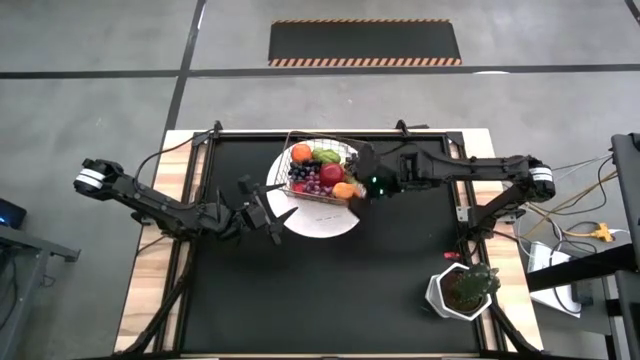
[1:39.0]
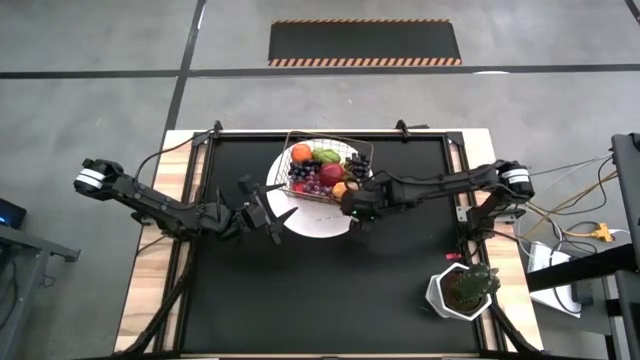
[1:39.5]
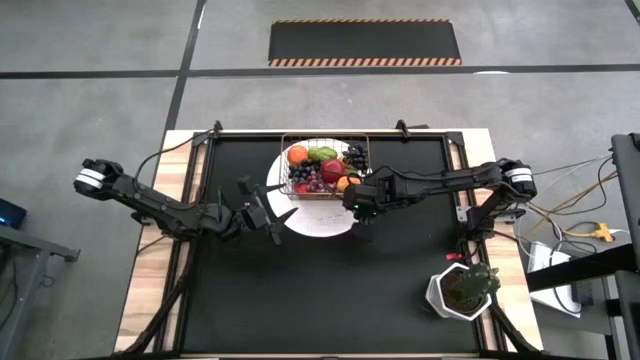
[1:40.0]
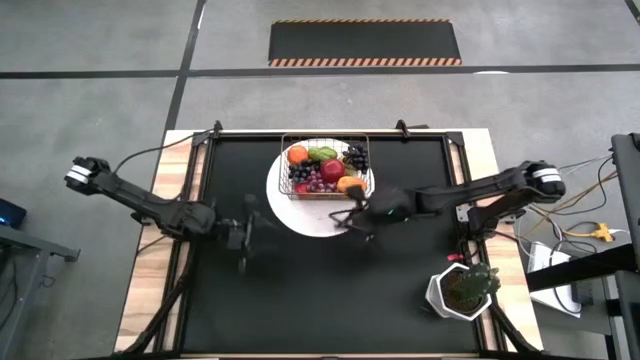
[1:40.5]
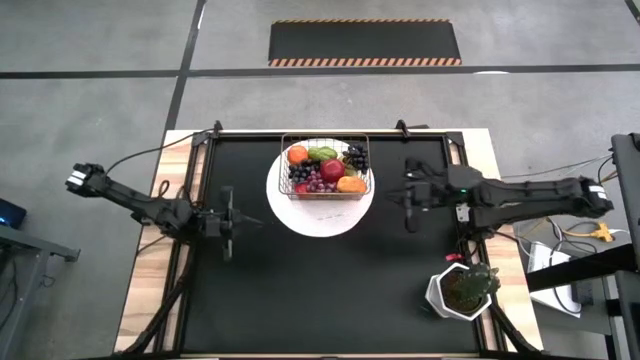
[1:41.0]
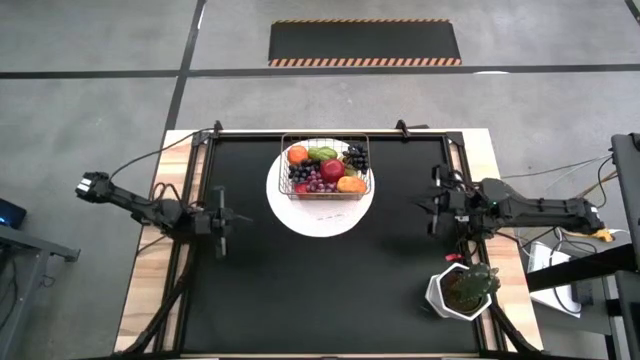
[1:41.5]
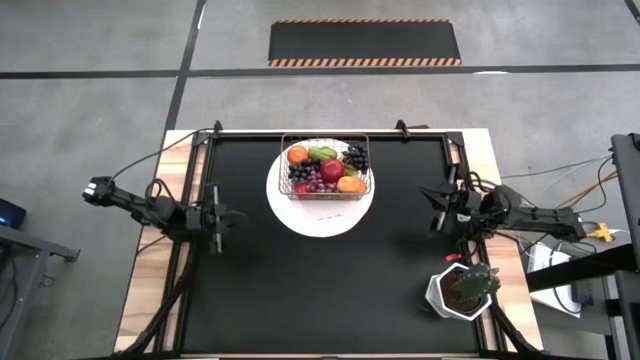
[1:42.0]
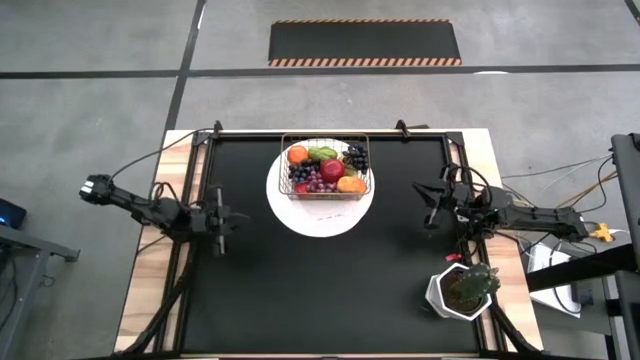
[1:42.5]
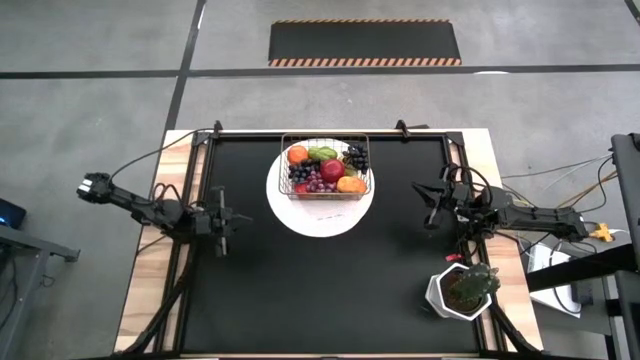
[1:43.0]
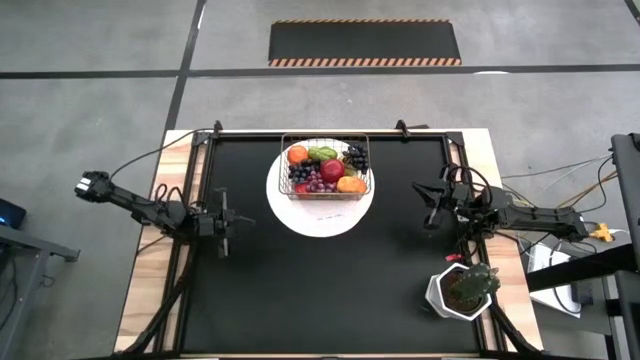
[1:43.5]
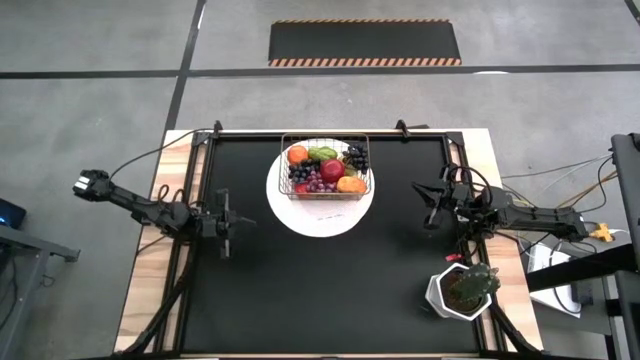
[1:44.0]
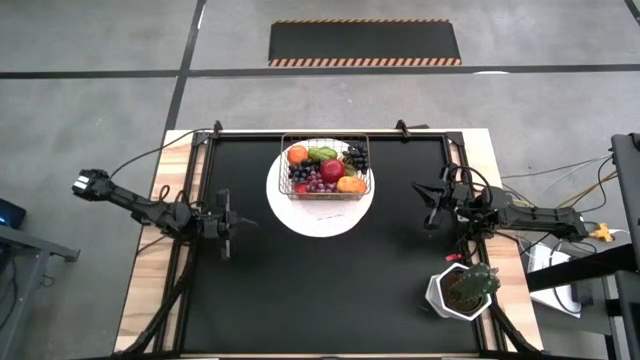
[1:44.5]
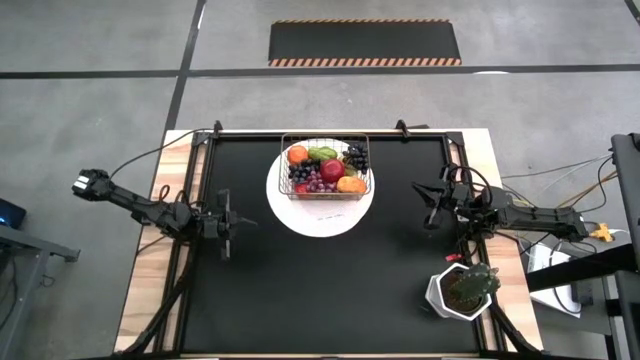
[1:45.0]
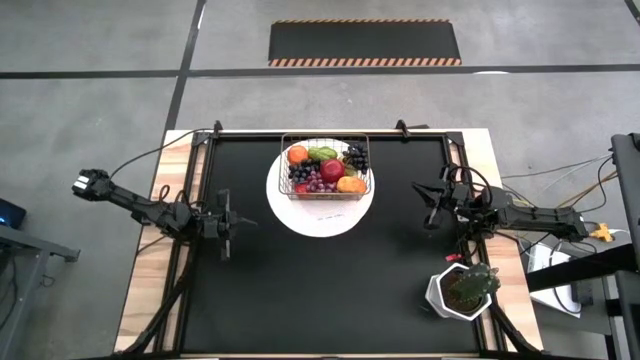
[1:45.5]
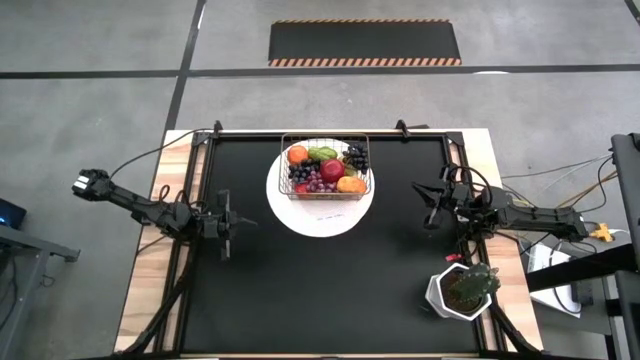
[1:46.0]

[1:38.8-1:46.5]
Task: Build produce basket
Return to Home Position

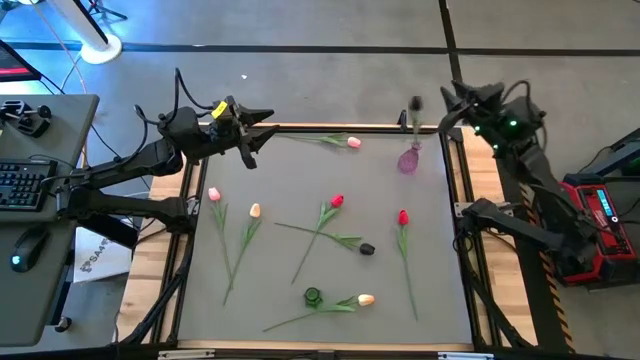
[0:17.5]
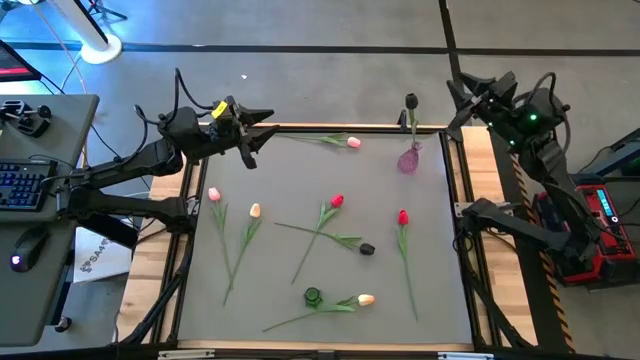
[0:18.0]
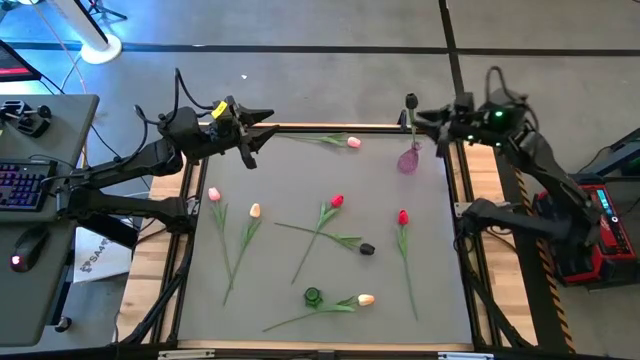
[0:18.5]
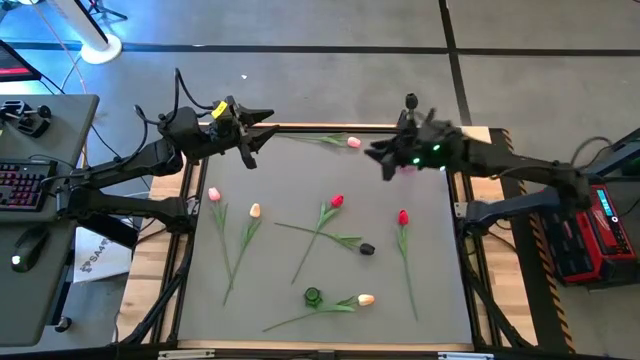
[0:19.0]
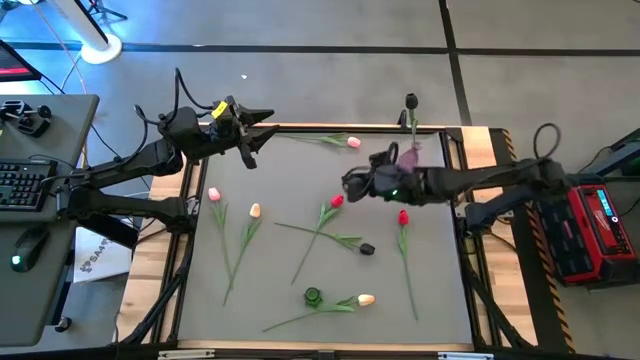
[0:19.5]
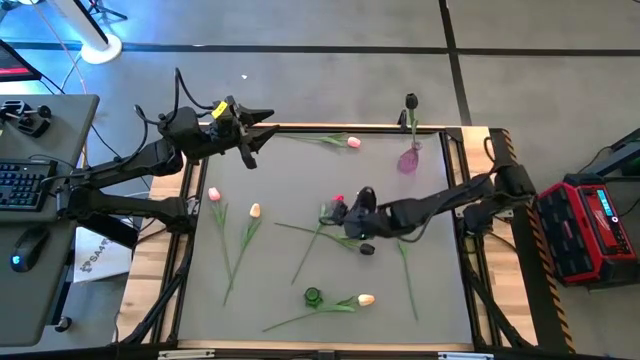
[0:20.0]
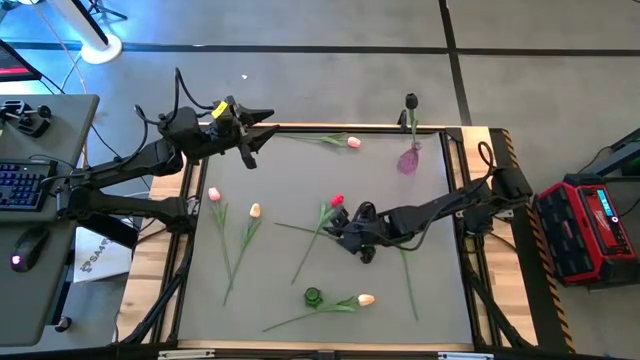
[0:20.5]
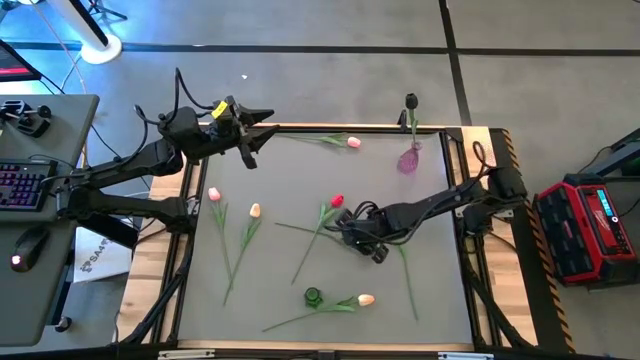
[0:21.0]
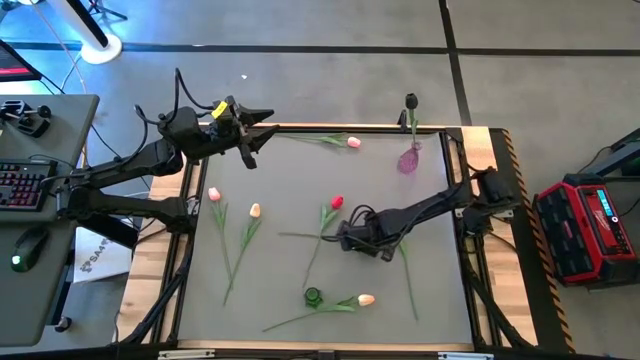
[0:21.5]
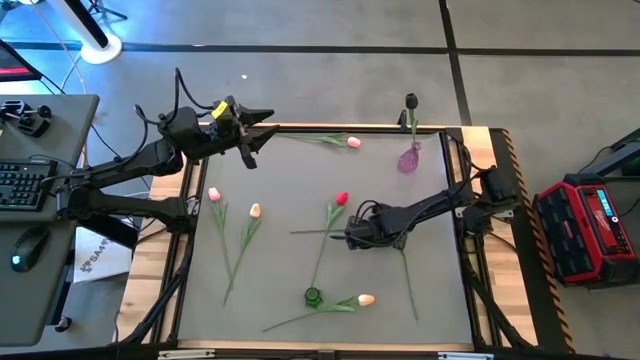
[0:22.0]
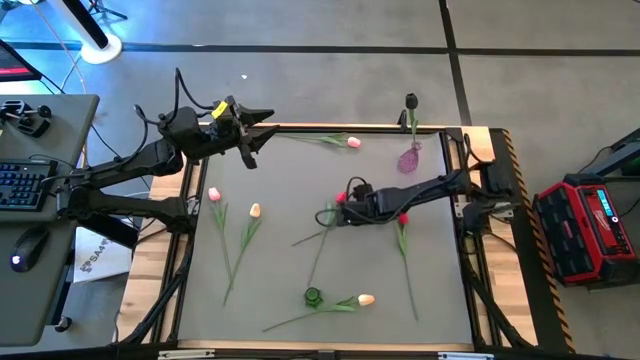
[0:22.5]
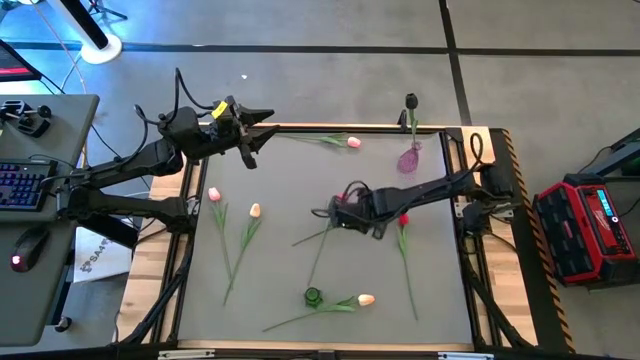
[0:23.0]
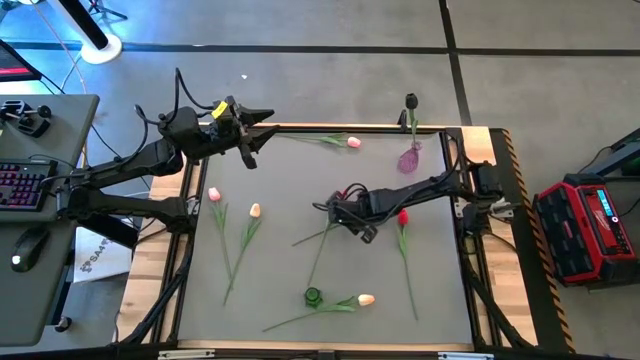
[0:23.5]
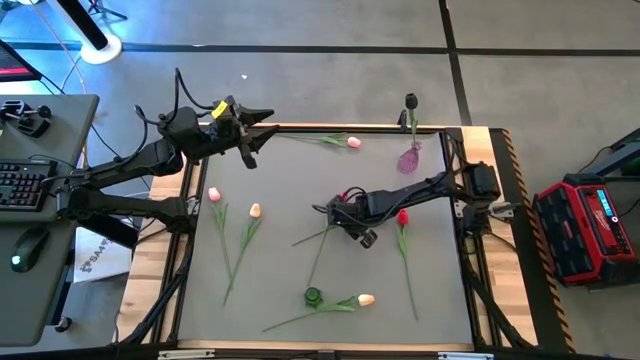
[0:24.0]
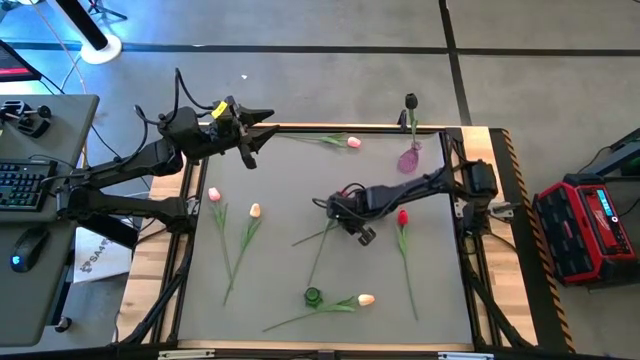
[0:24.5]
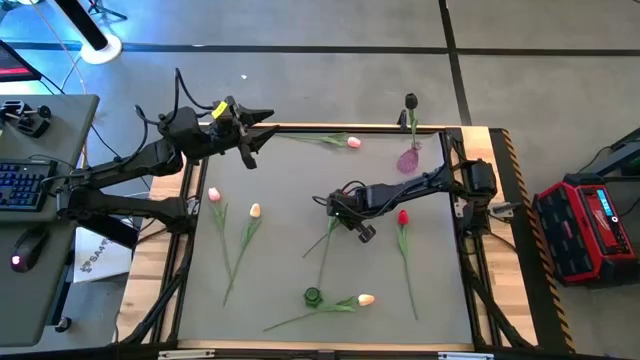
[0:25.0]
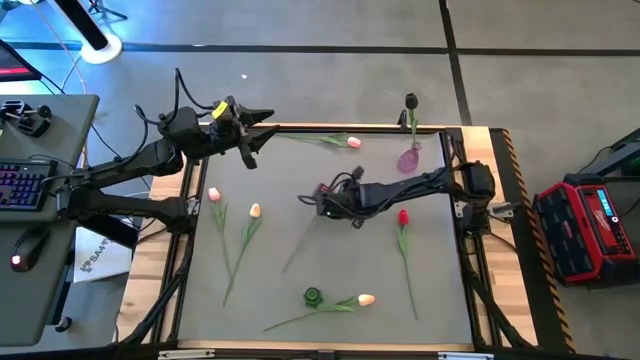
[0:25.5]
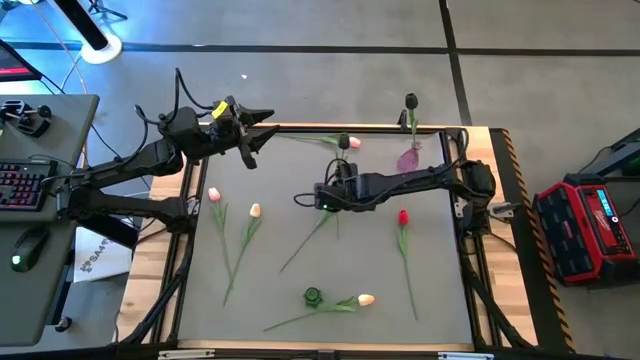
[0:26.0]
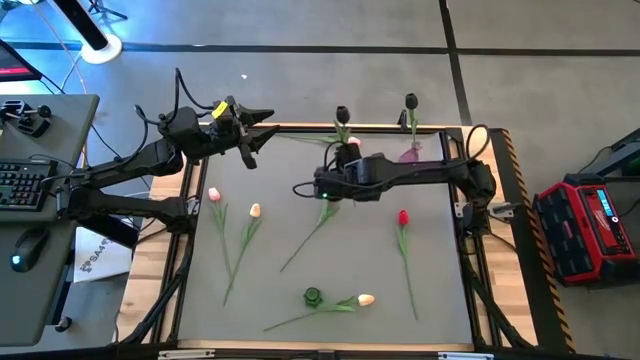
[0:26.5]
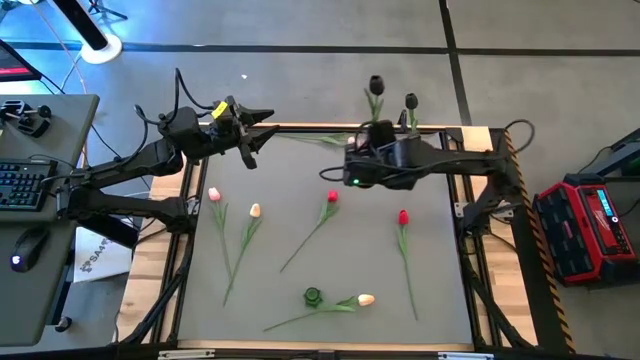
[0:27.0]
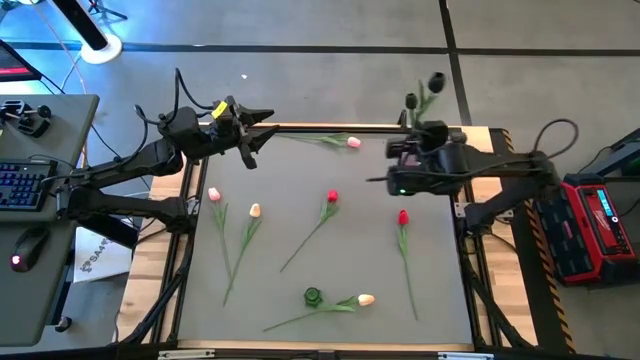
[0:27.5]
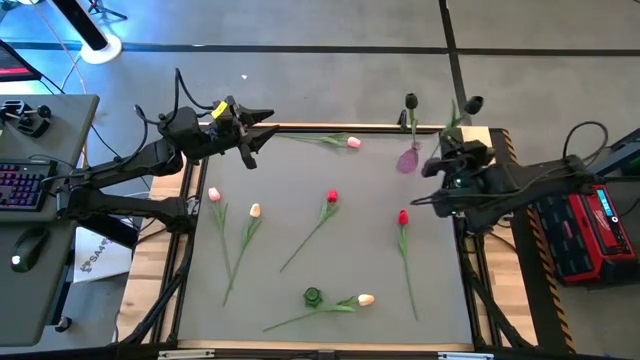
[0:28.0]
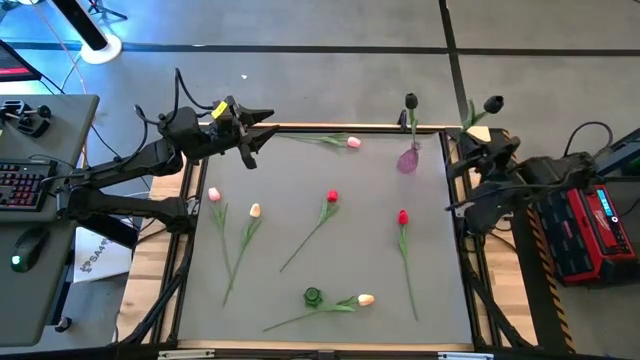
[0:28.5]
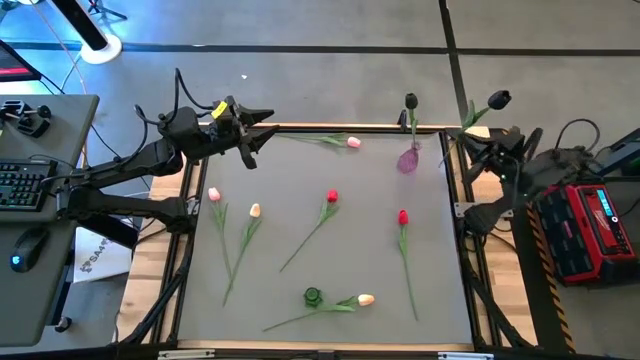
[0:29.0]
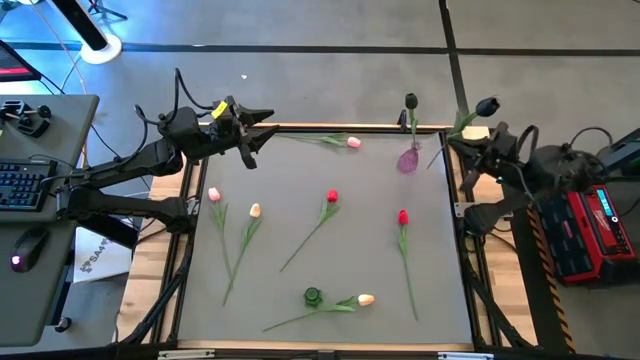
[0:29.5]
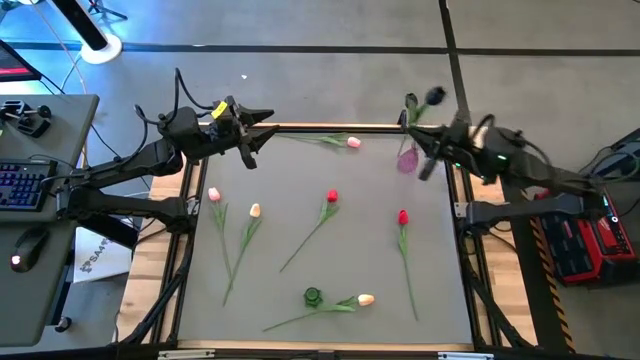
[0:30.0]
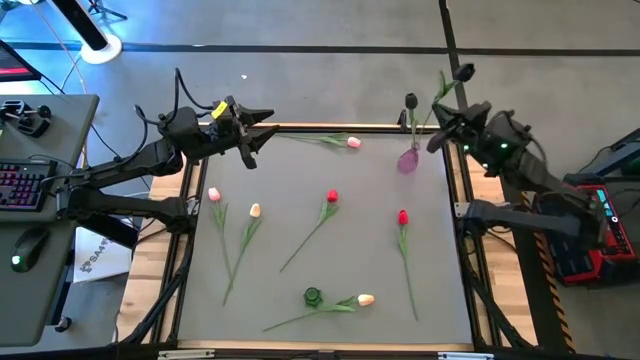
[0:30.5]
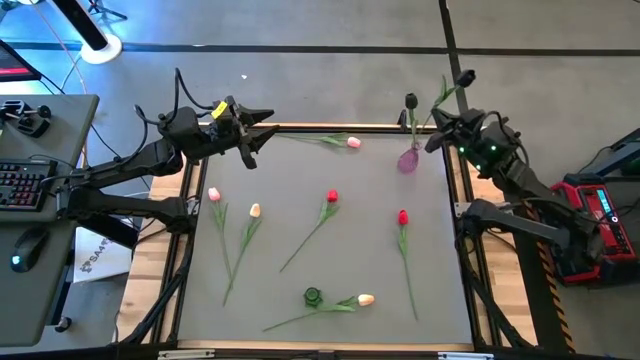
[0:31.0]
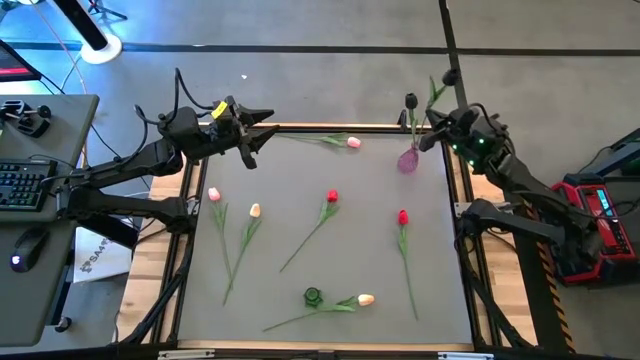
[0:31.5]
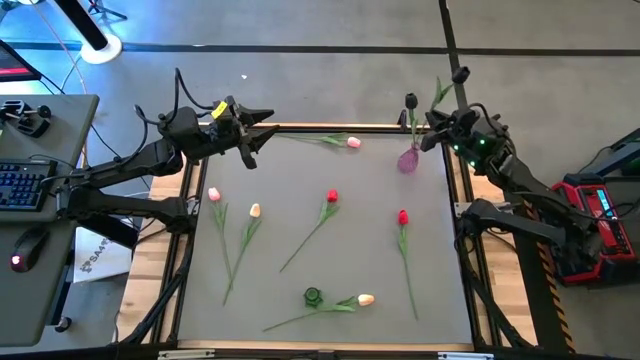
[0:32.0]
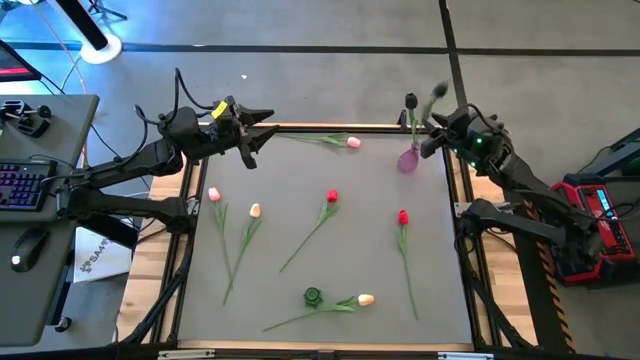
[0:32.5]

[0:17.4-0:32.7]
Task: Sort flowers into vase by color
Put the black flower into the violet vase
